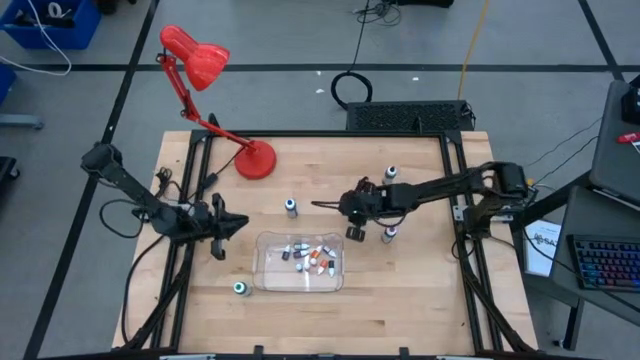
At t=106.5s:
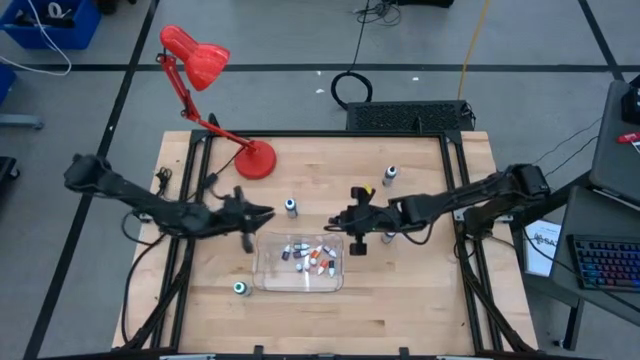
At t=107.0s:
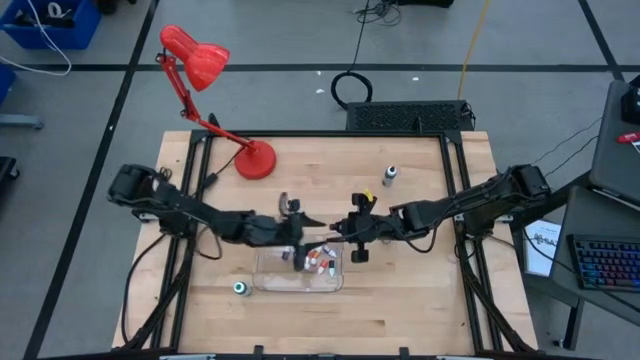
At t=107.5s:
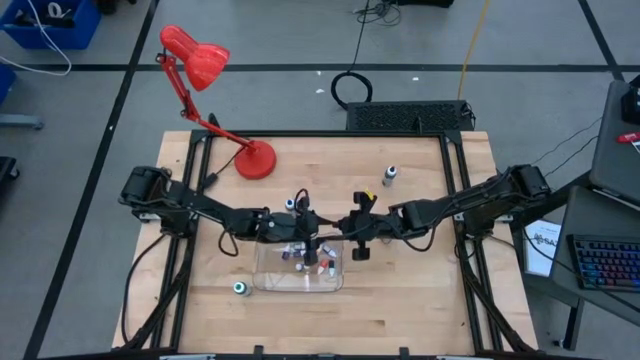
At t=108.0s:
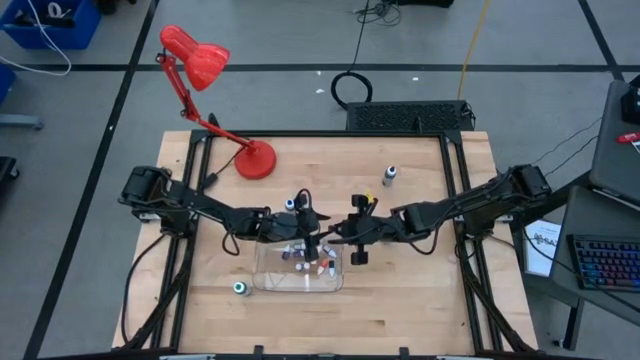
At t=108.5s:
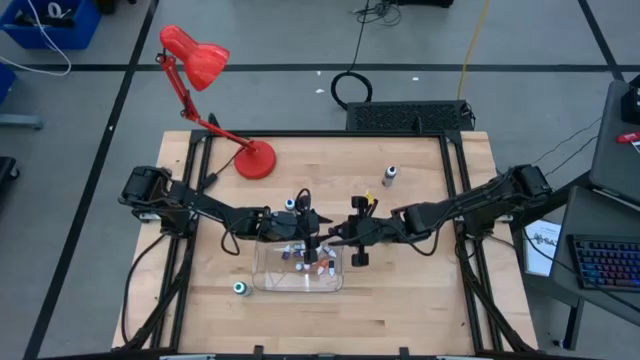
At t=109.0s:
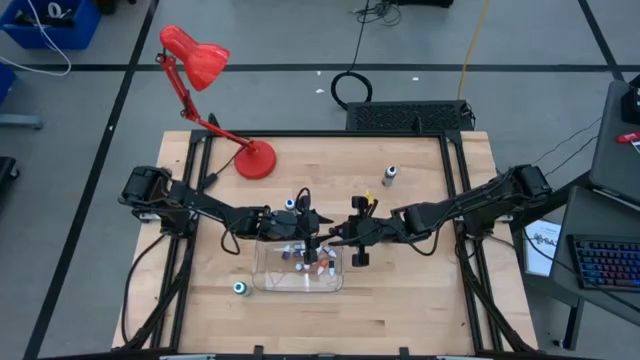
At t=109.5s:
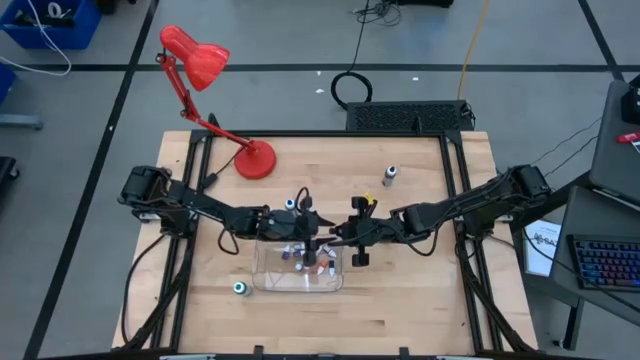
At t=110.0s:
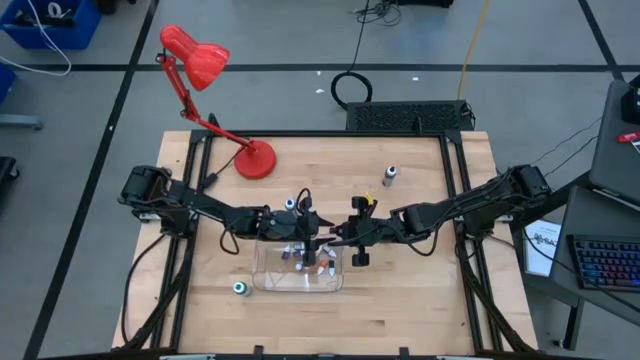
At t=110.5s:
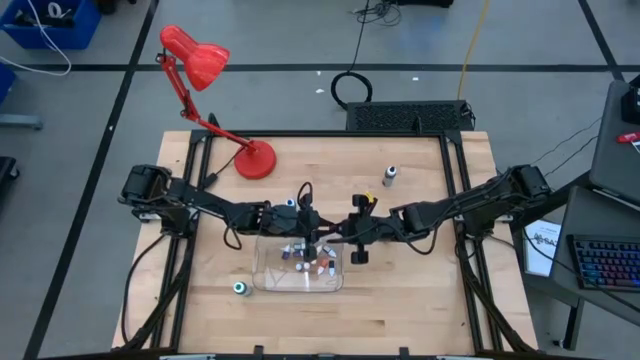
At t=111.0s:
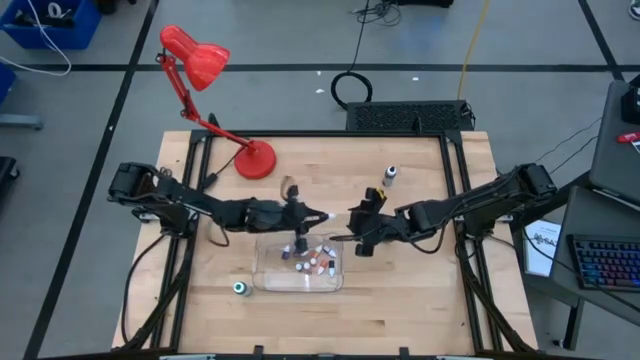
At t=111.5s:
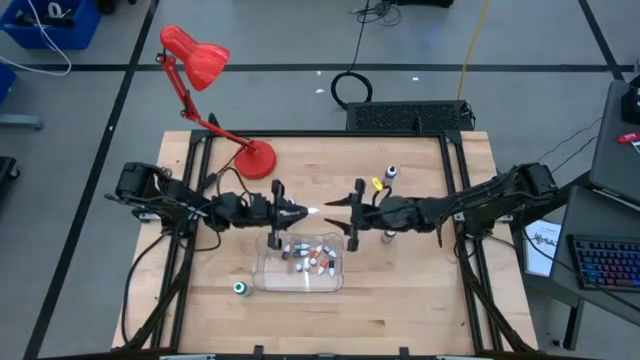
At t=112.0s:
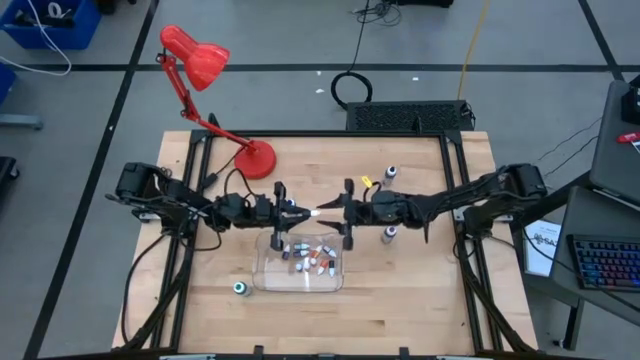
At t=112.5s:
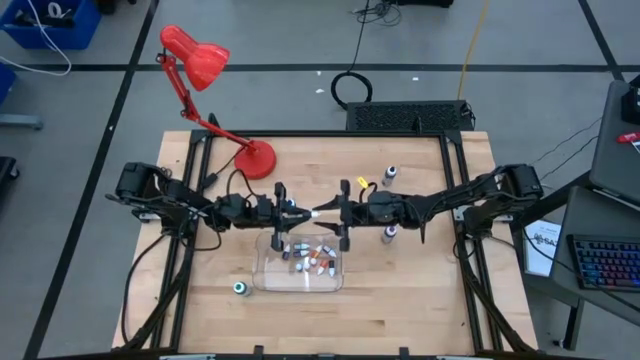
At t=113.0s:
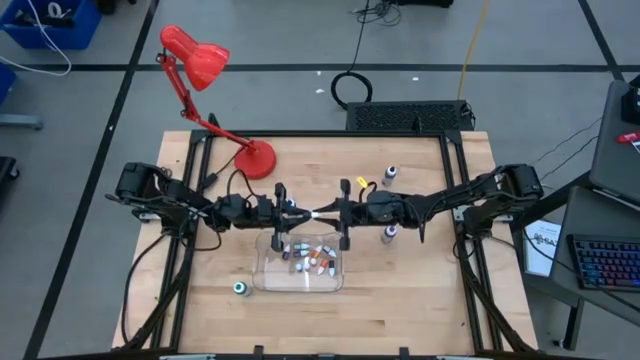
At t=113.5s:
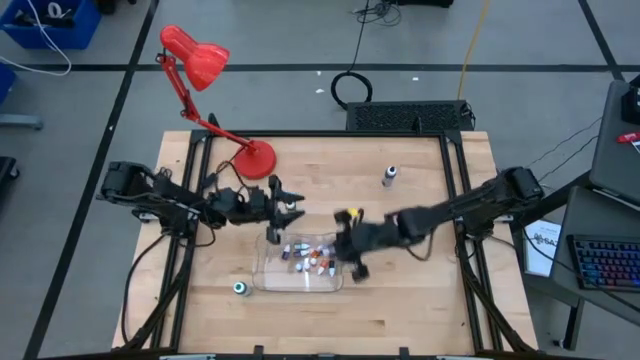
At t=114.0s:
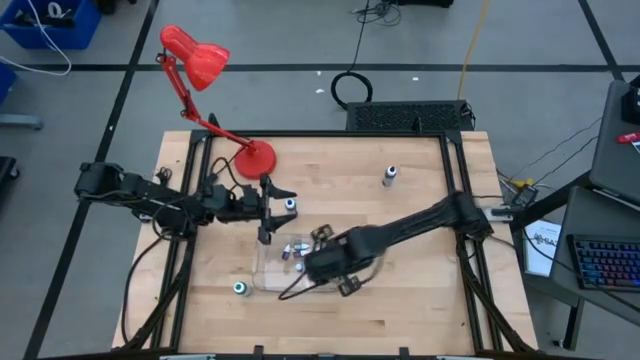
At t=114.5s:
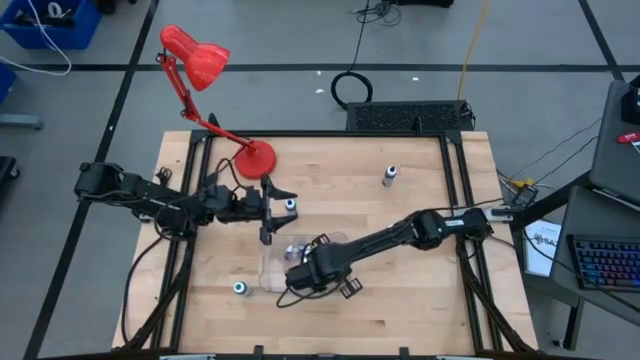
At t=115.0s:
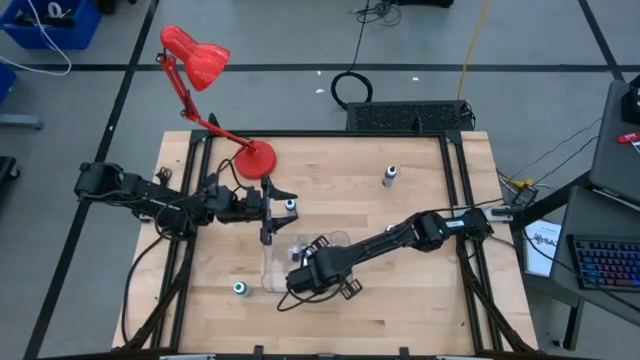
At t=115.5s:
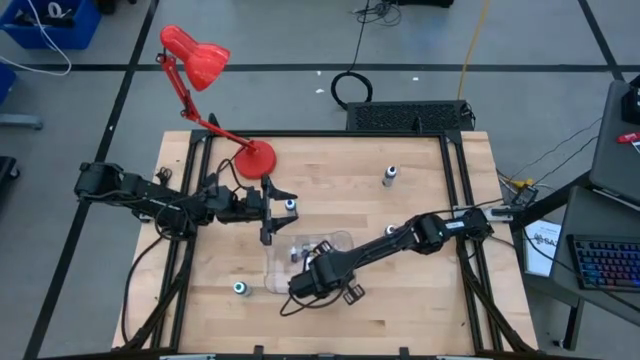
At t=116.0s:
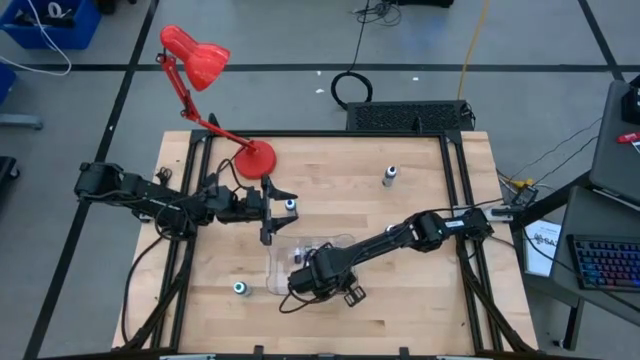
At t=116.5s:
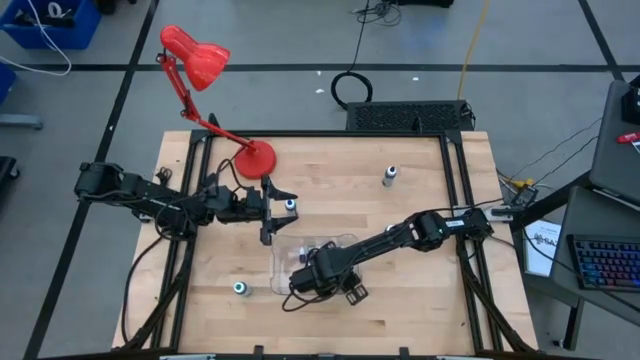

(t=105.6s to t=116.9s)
Task: Pick & Place food coloring
Put the small black food coloring into the bin

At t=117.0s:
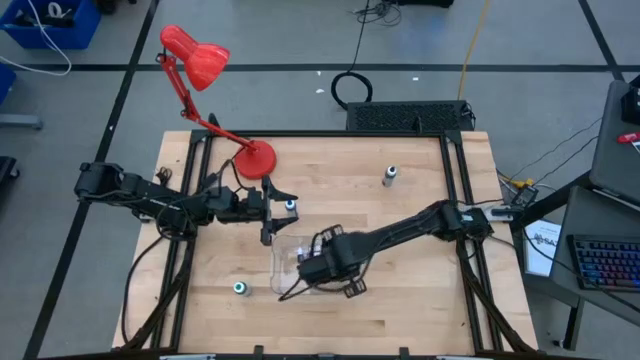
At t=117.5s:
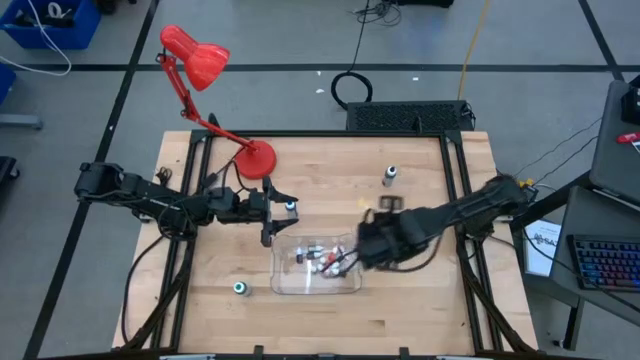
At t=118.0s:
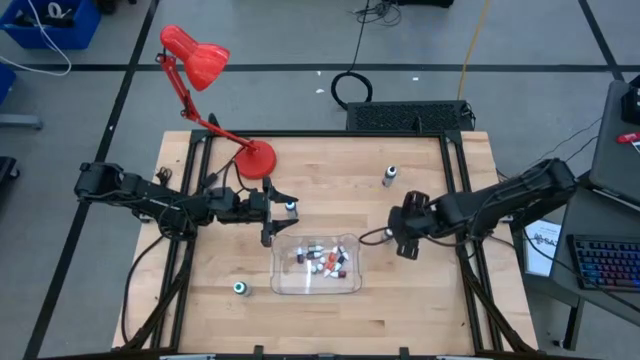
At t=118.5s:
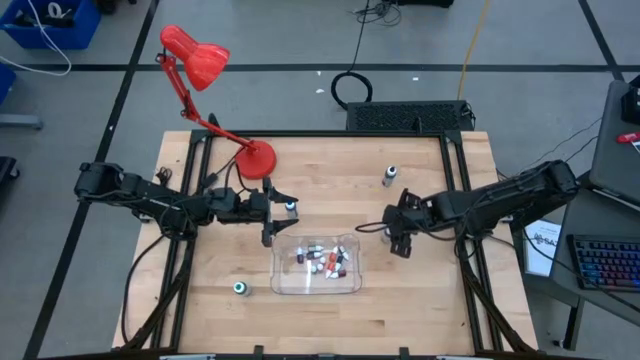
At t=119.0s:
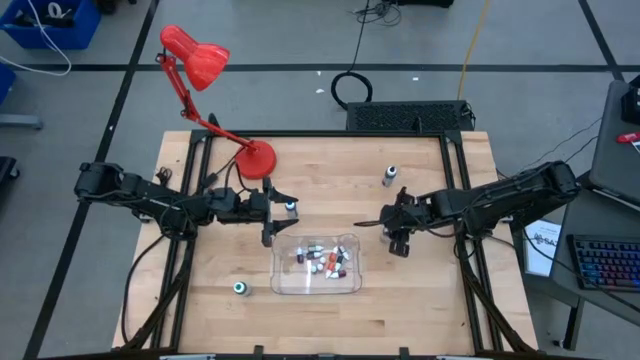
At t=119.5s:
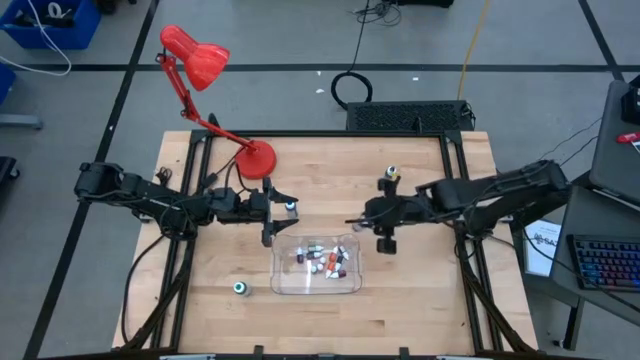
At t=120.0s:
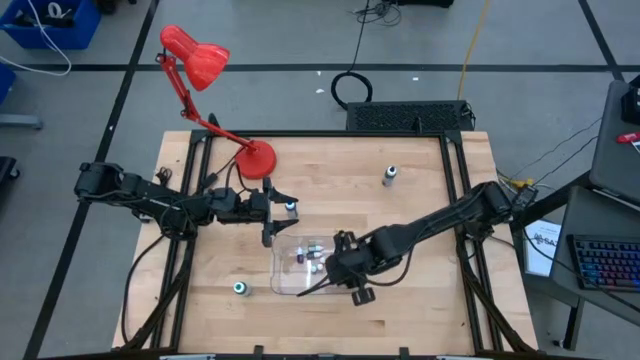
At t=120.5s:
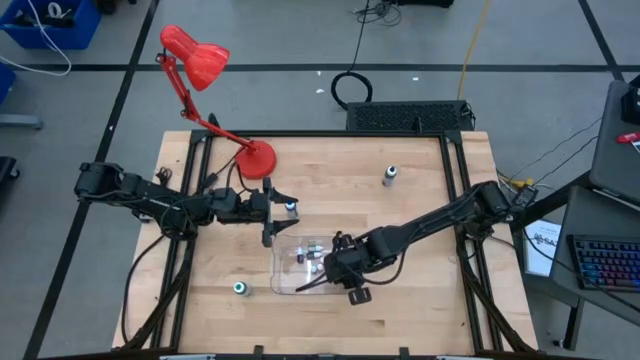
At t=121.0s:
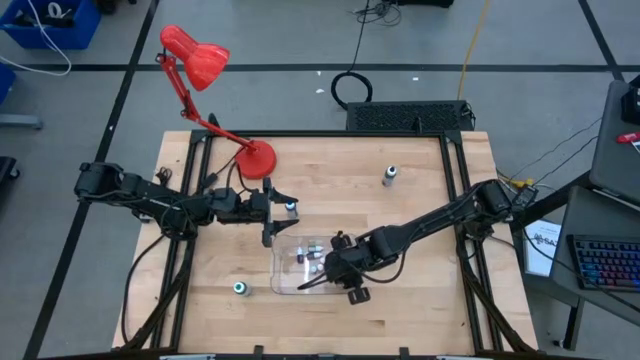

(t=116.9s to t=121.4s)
Put the large purple food coloring into the bin

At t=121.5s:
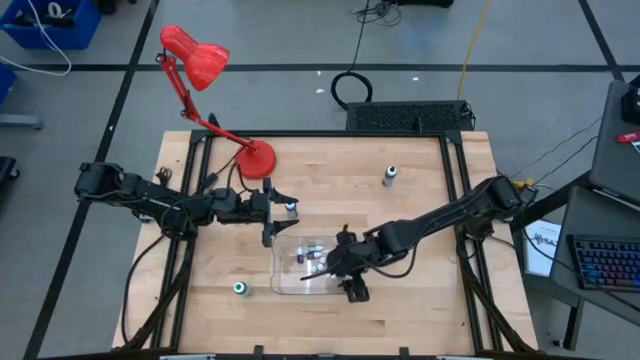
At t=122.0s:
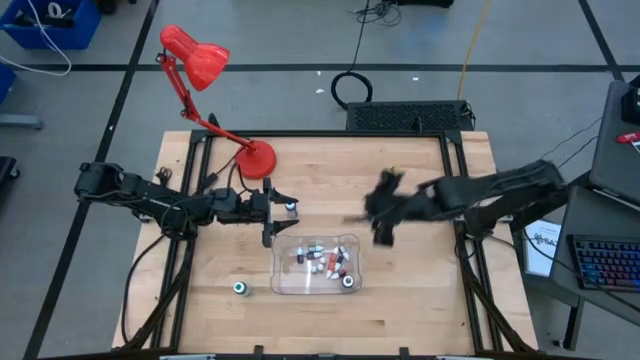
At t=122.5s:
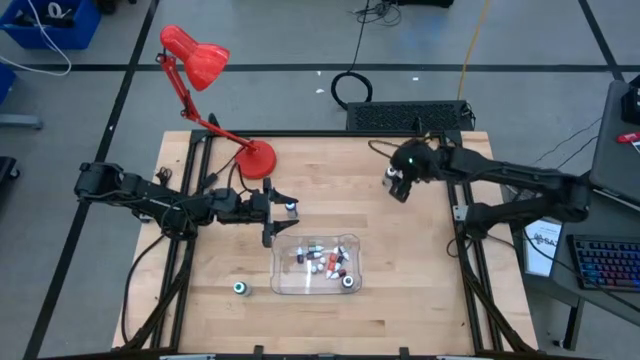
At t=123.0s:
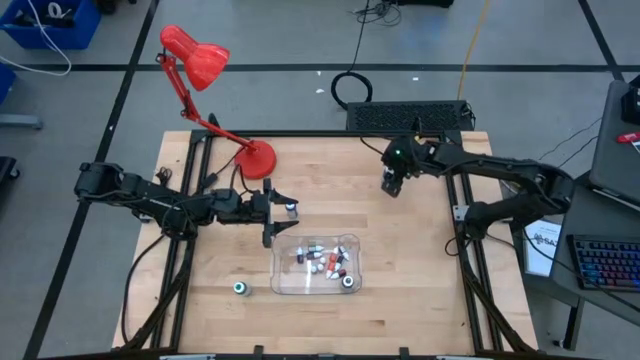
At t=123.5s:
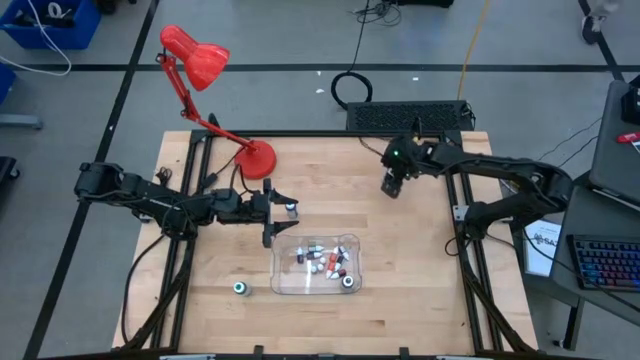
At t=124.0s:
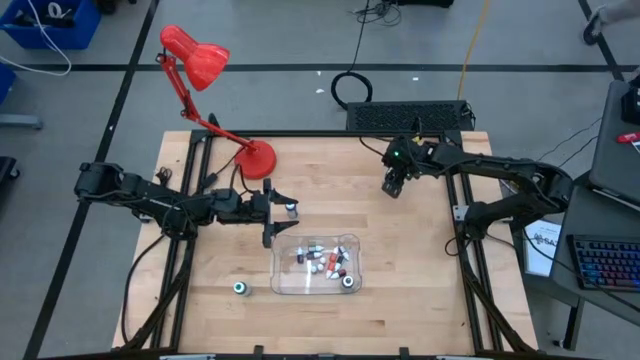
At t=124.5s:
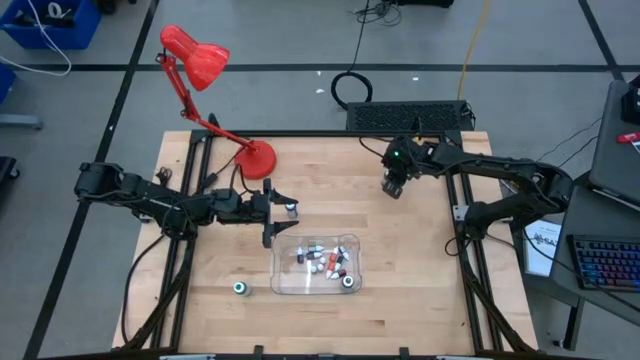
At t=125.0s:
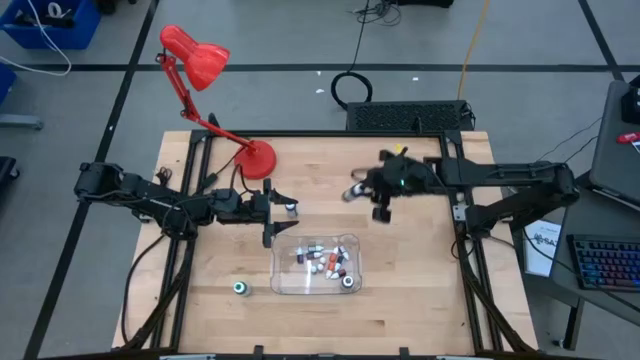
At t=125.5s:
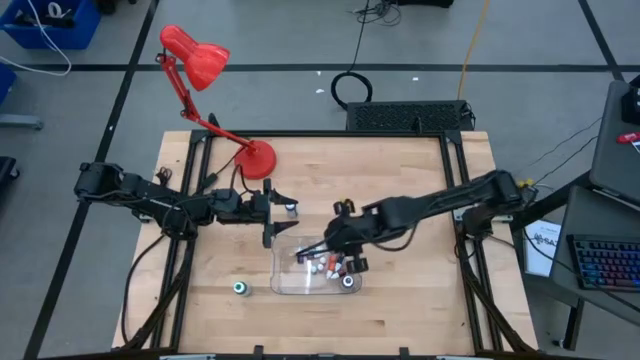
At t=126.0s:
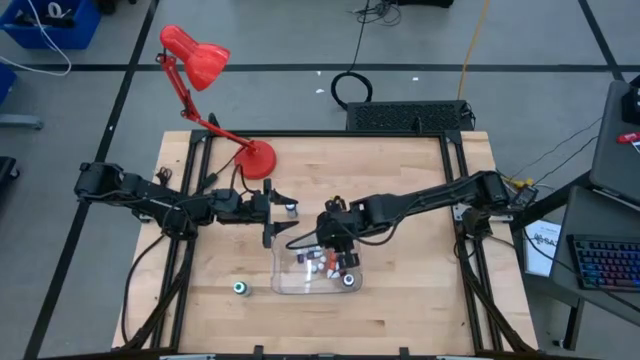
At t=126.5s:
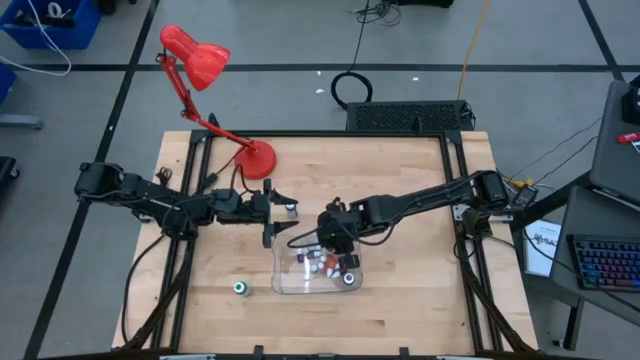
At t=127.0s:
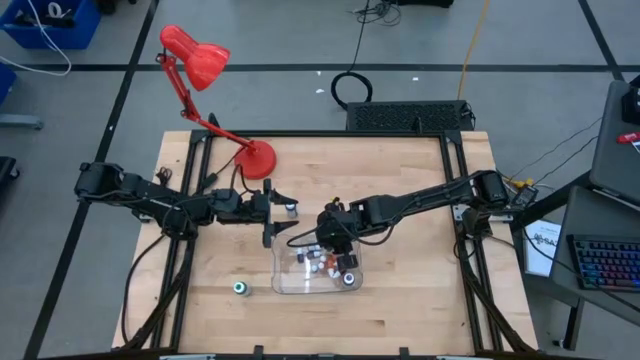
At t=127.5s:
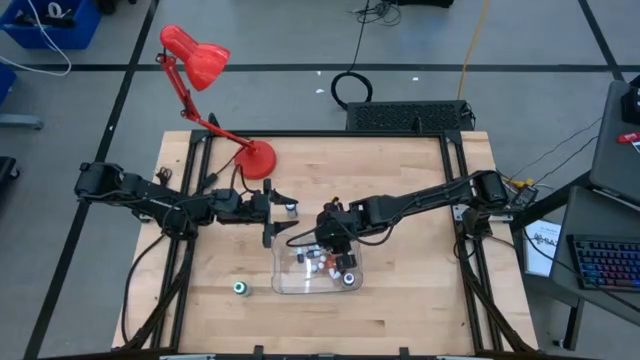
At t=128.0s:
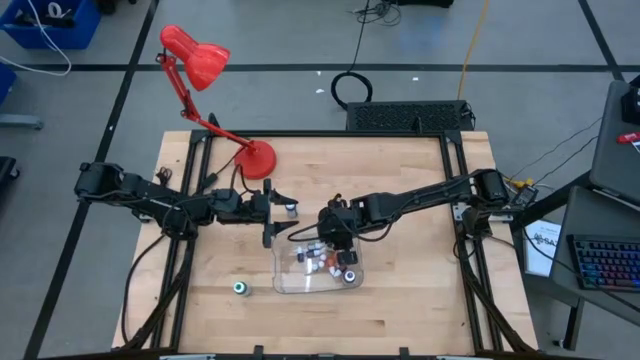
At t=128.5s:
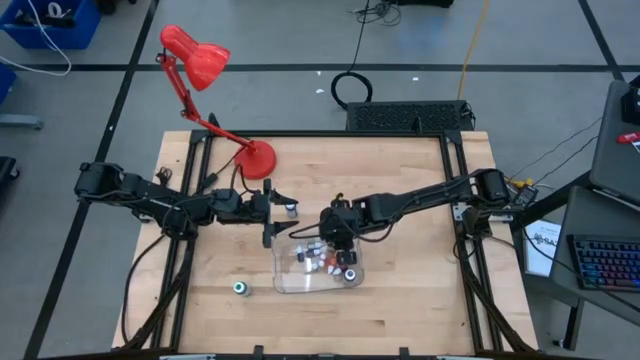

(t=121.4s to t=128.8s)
Put the large black food coloring into the bin
